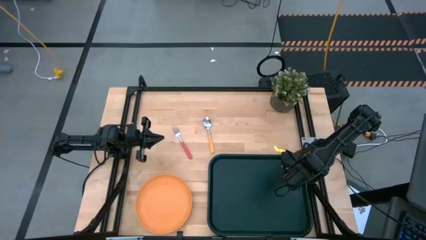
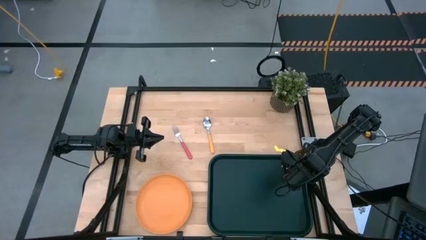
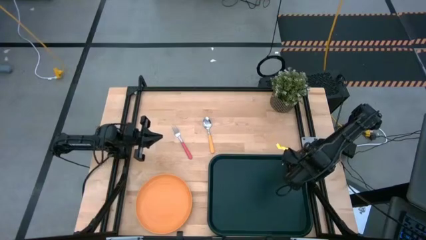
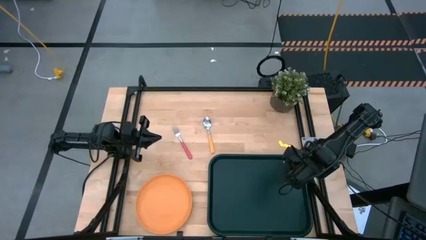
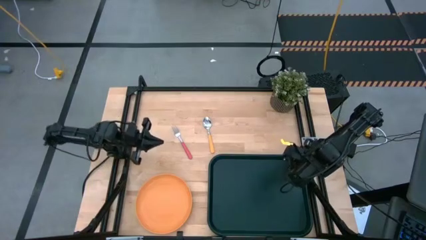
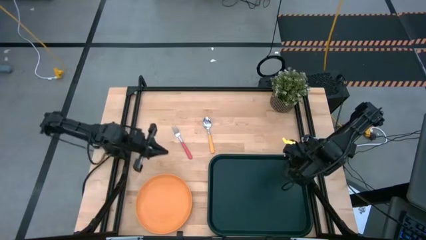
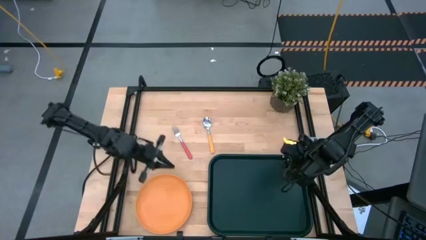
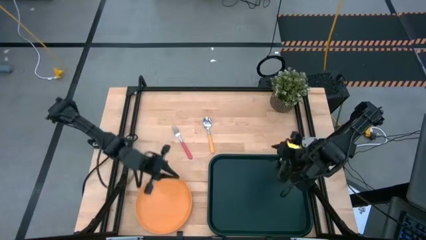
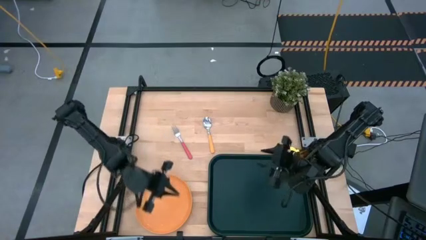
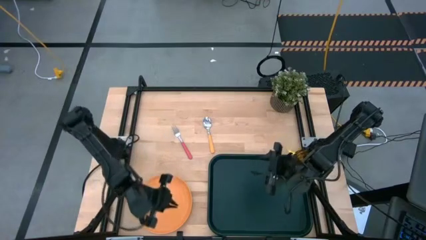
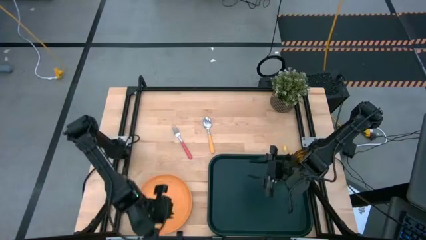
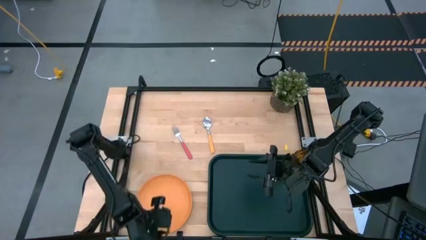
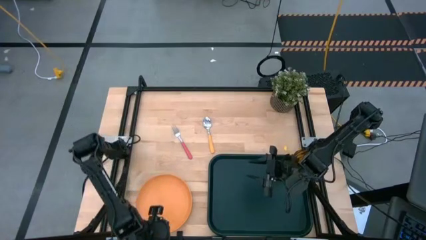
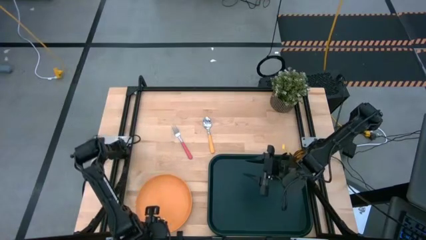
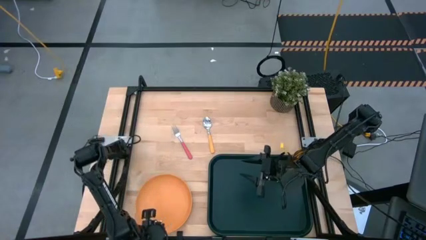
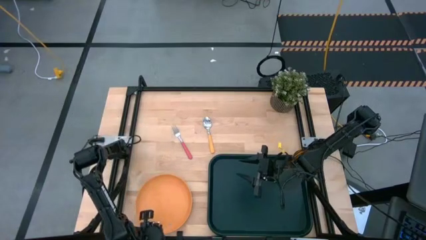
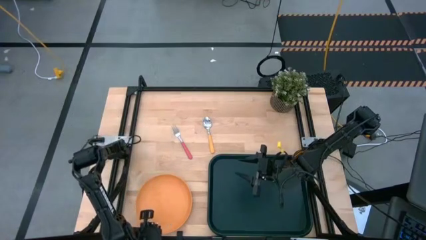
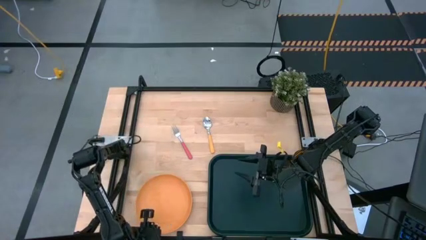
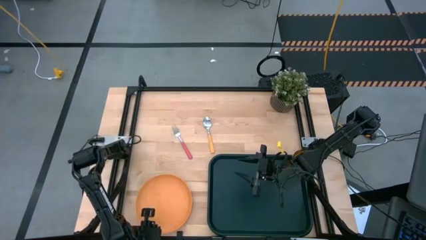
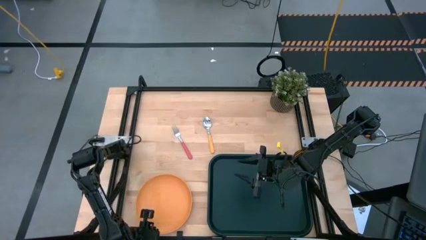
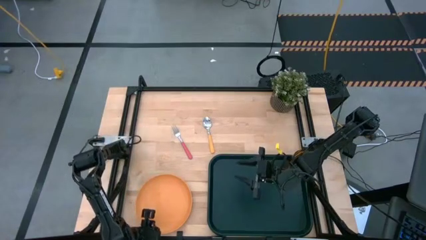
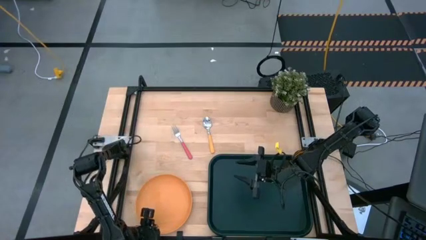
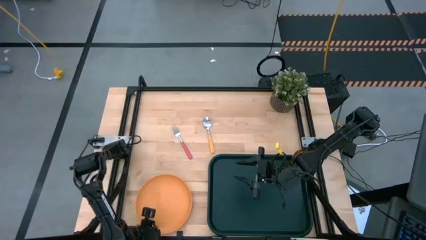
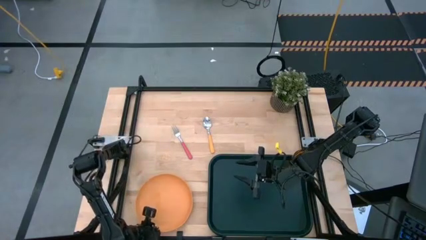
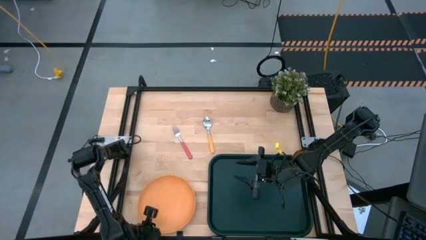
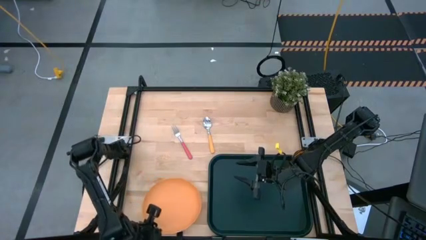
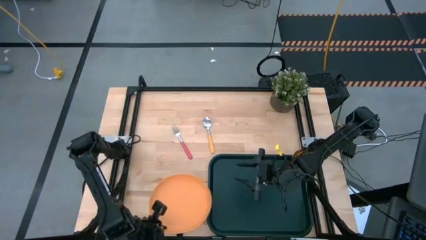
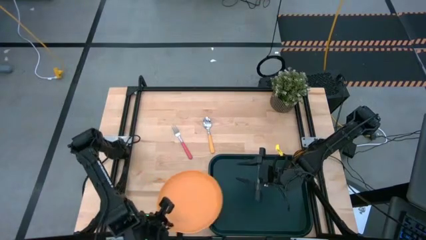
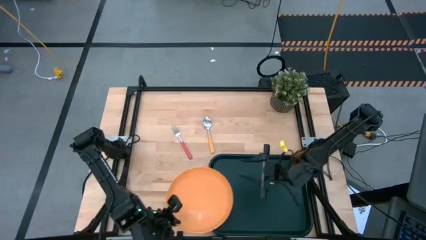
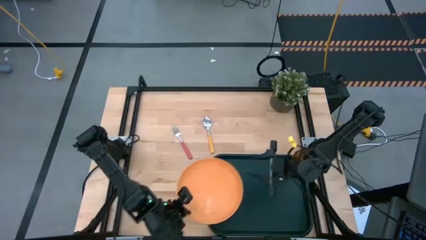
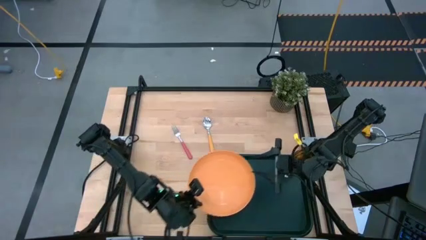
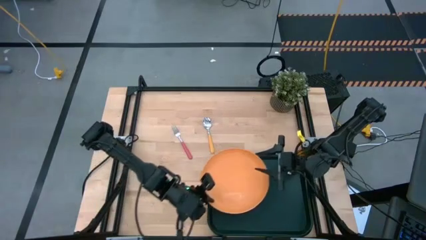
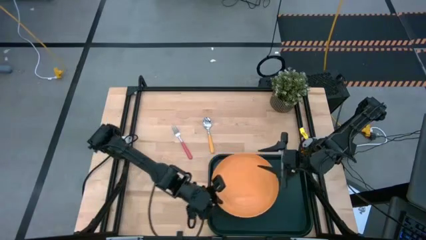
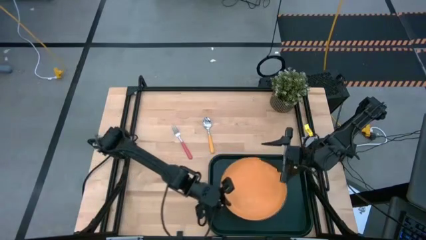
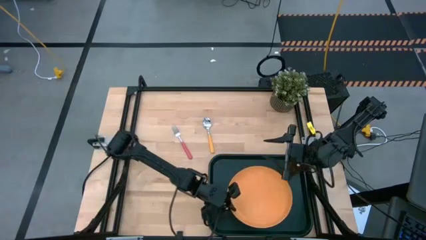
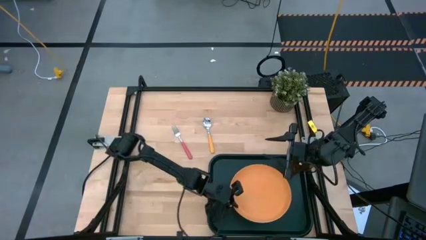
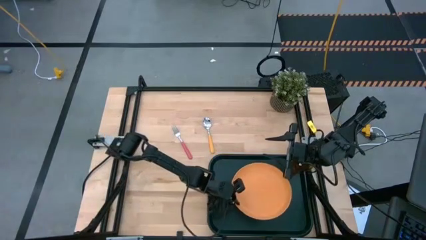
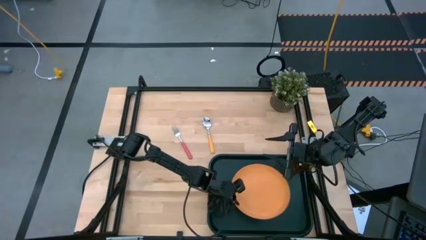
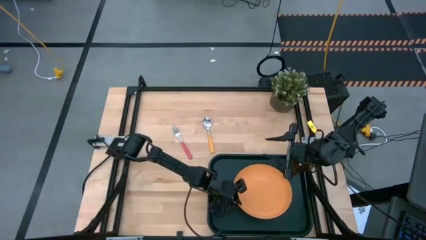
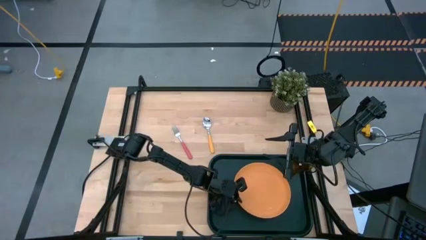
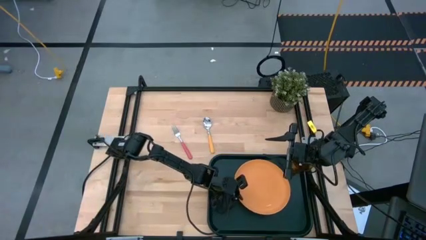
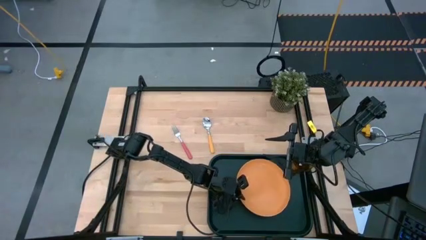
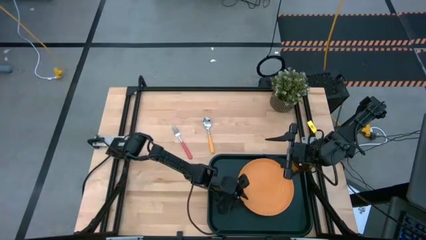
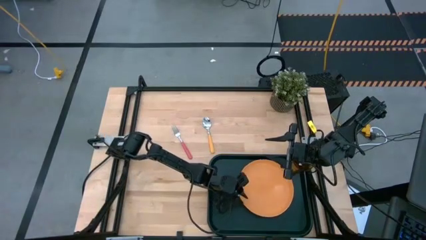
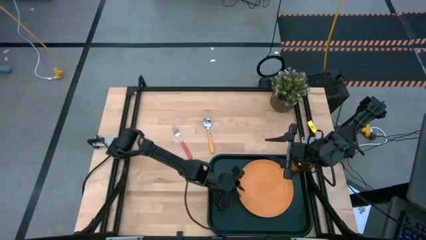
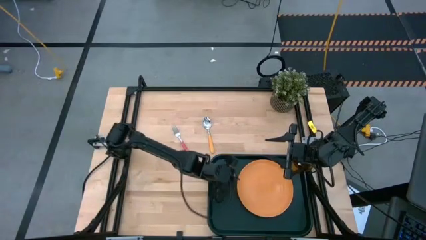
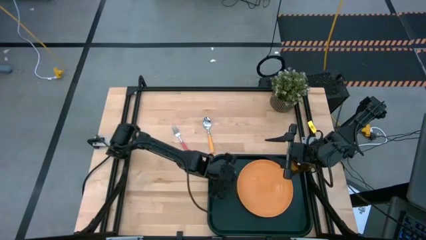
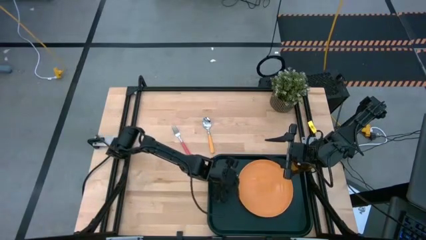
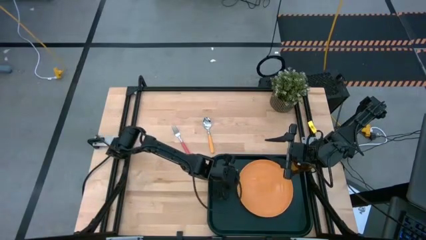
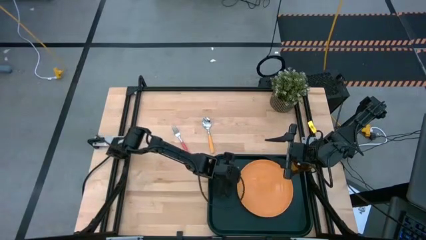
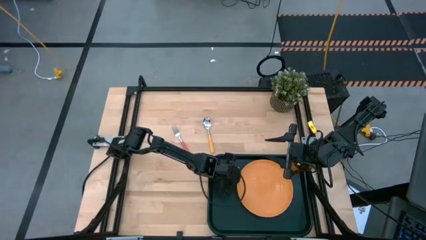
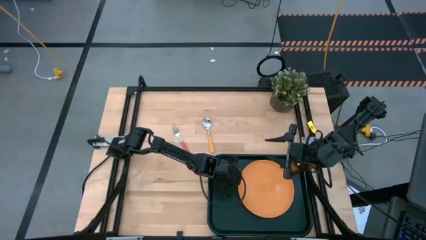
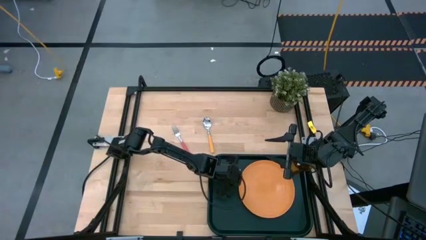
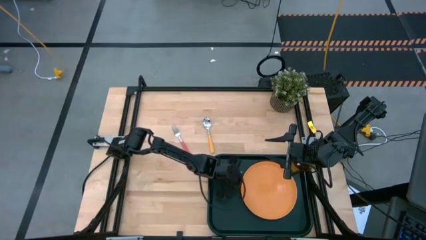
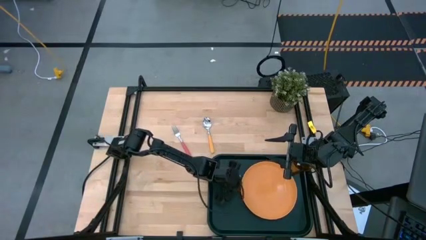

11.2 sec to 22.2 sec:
Task: Pick and place plate/cup/fork/spoon on tray
Put the orange plate on the bottom left of the brown cup

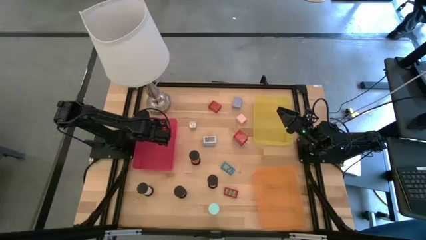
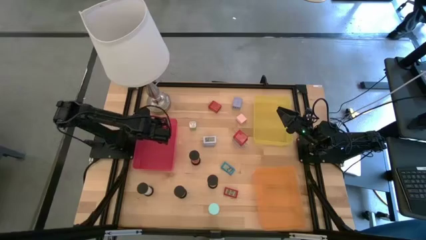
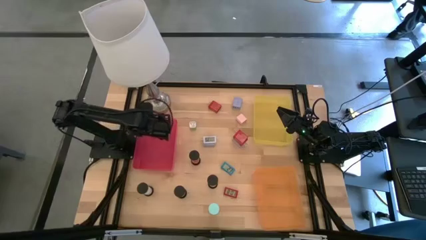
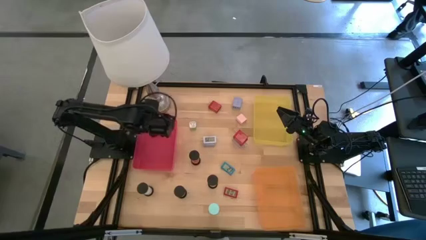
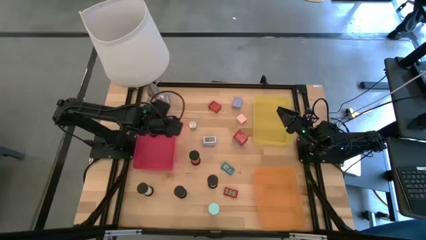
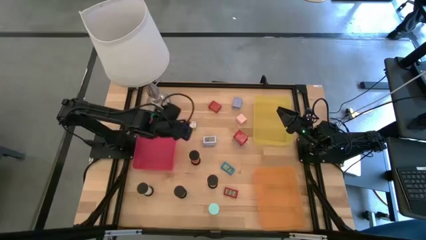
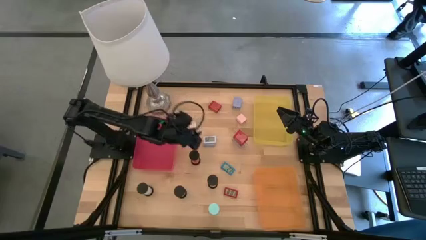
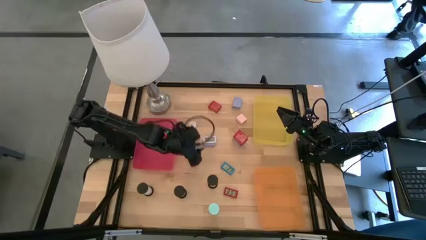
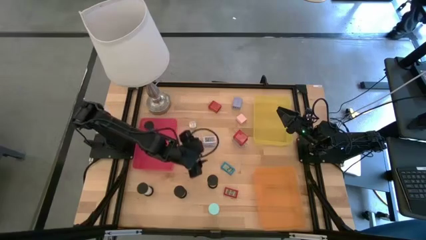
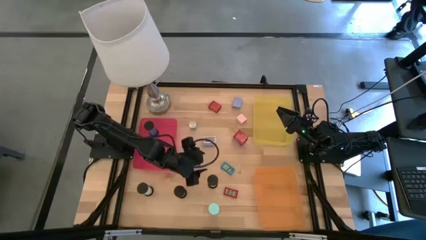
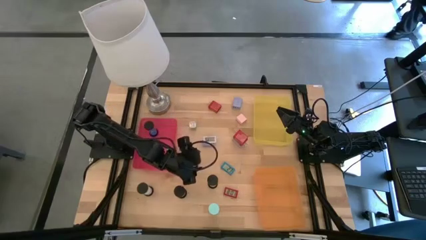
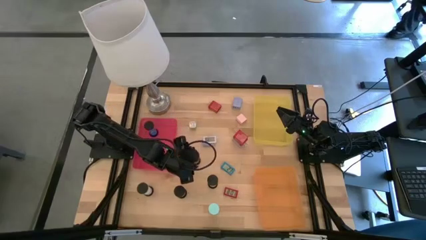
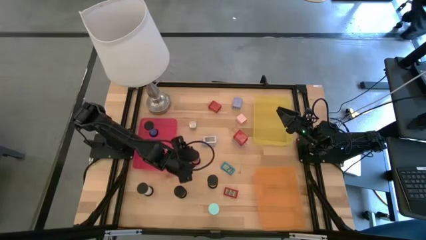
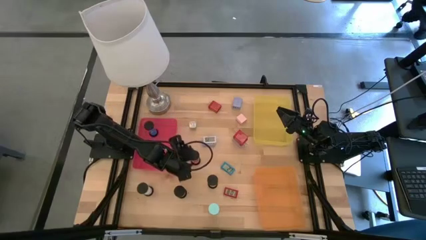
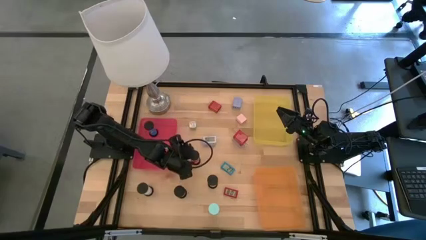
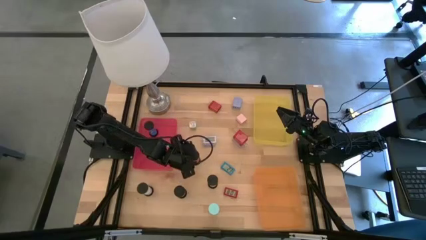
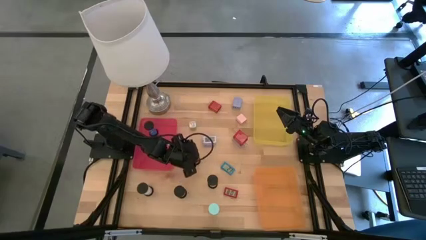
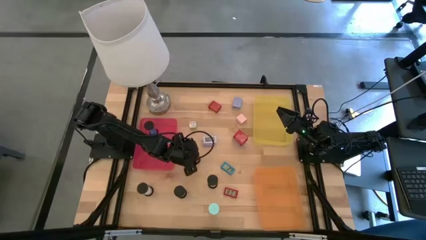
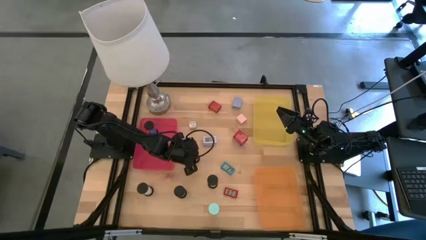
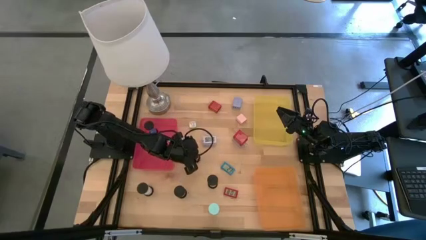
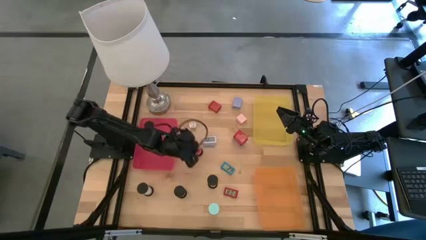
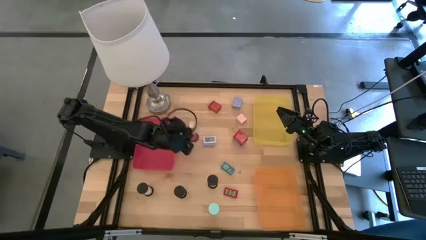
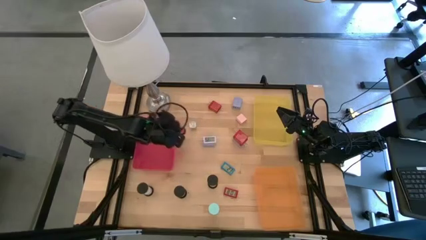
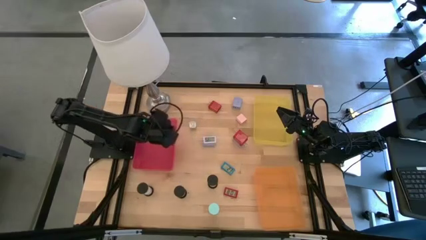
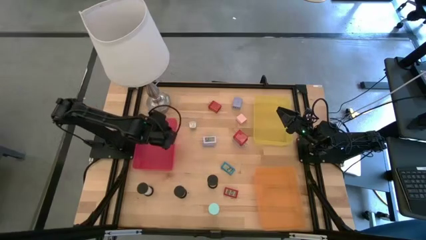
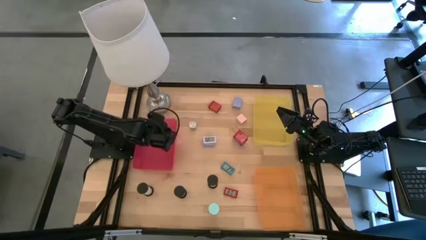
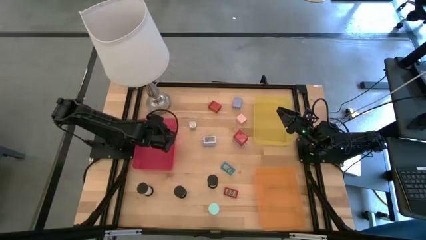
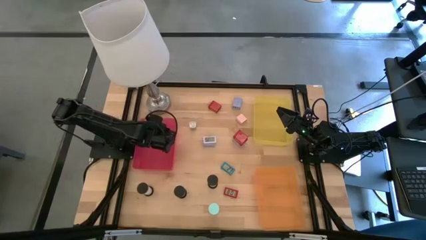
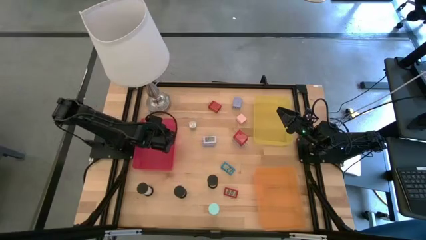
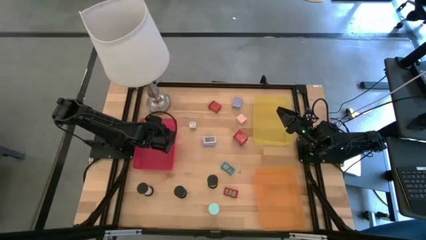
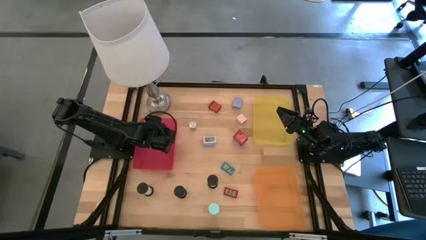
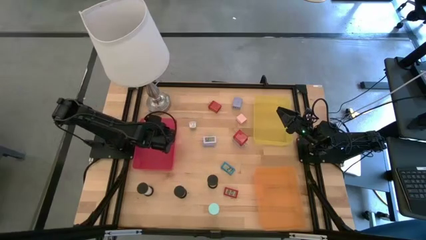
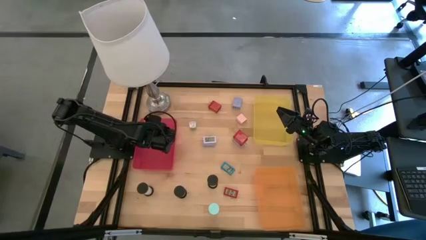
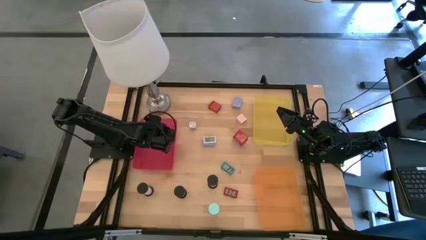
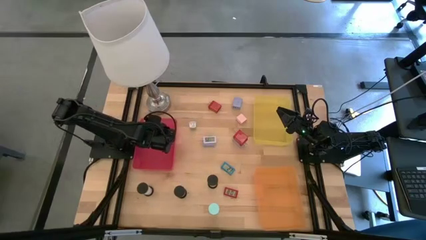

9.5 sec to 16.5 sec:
Task: Pick & Place Office items
Put the red hourglass timer into the red bin
